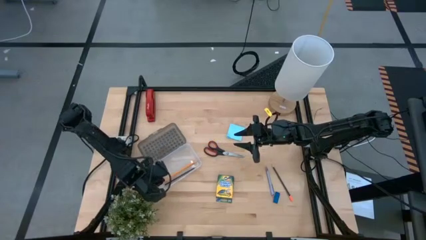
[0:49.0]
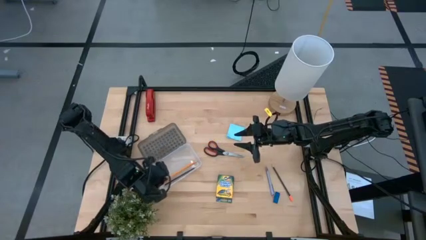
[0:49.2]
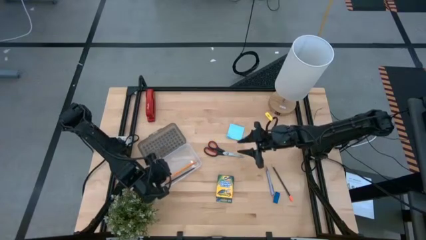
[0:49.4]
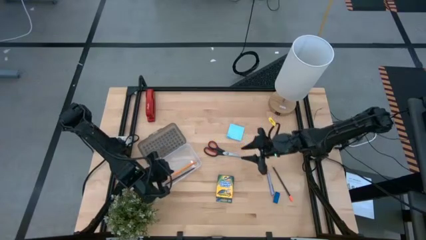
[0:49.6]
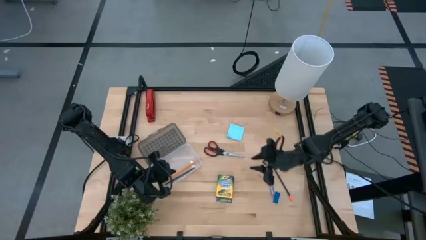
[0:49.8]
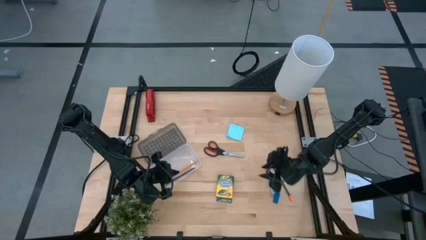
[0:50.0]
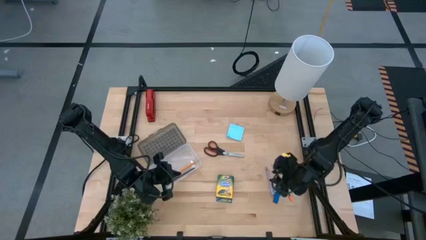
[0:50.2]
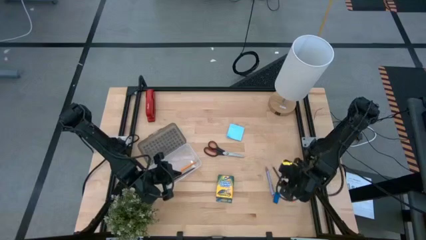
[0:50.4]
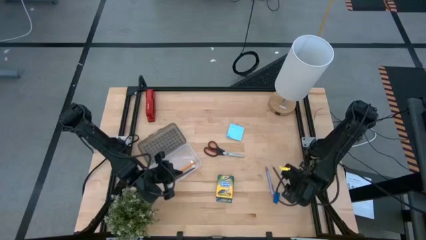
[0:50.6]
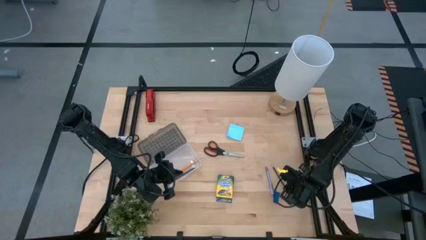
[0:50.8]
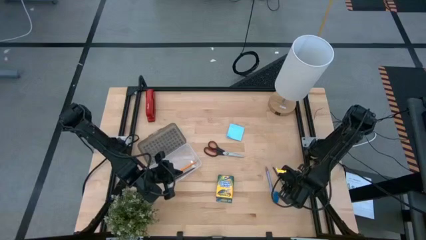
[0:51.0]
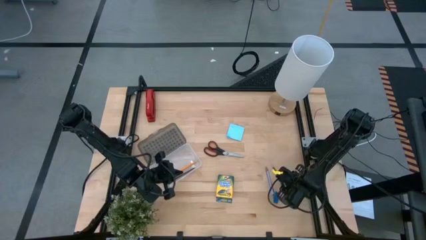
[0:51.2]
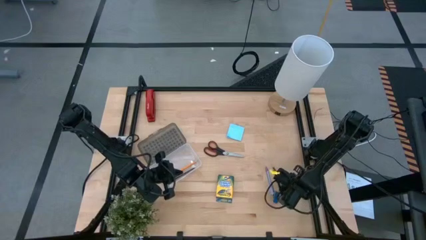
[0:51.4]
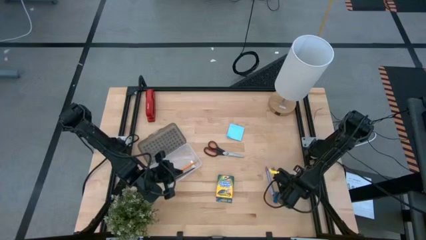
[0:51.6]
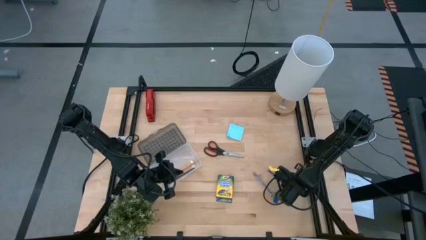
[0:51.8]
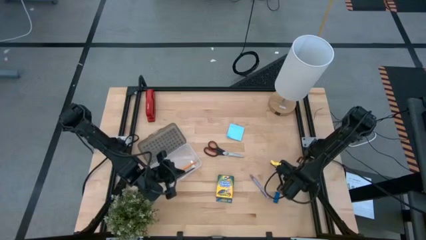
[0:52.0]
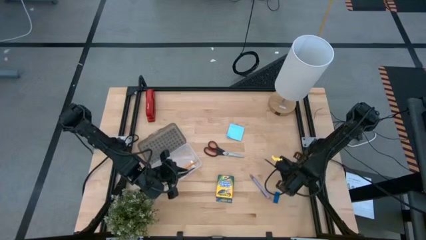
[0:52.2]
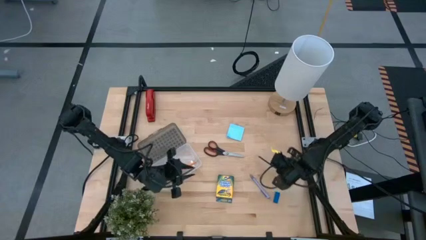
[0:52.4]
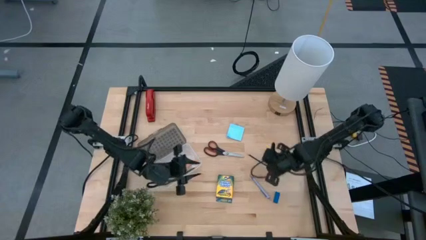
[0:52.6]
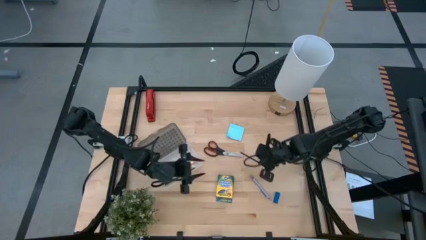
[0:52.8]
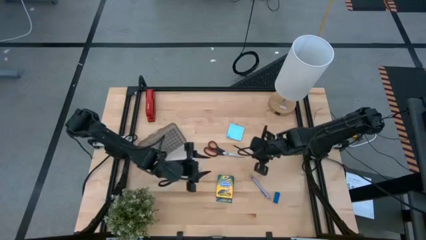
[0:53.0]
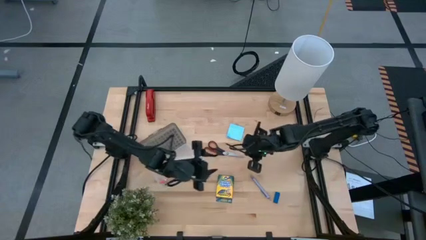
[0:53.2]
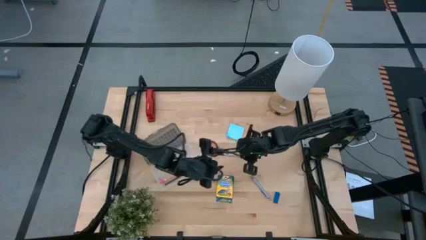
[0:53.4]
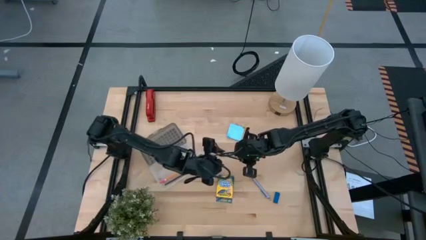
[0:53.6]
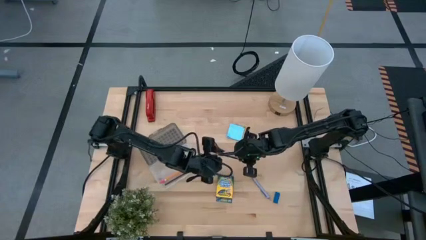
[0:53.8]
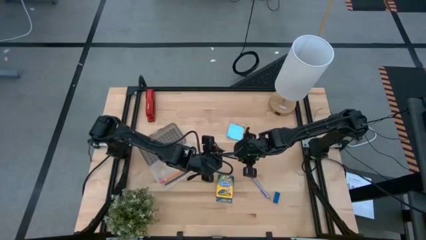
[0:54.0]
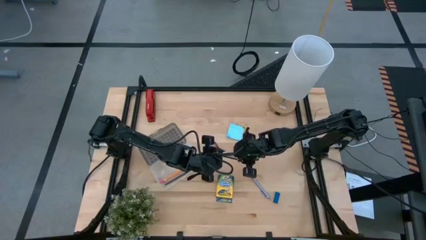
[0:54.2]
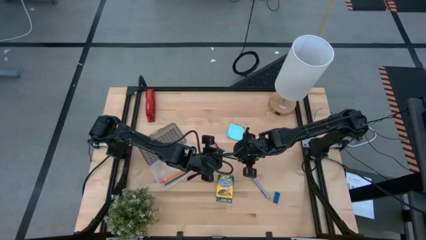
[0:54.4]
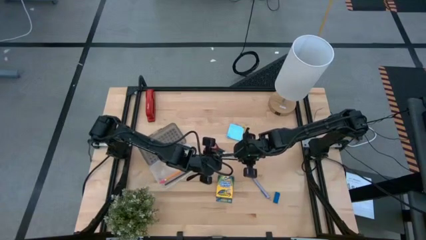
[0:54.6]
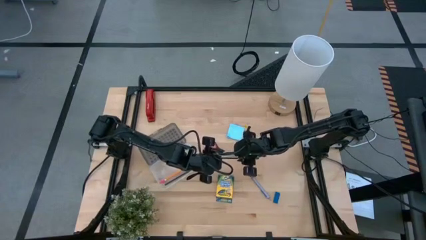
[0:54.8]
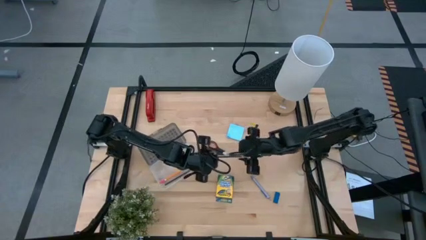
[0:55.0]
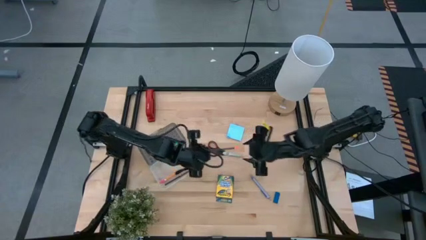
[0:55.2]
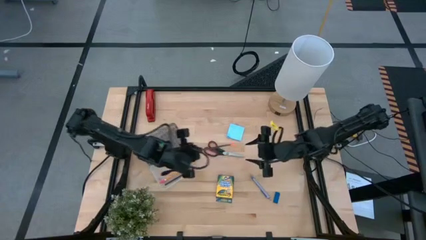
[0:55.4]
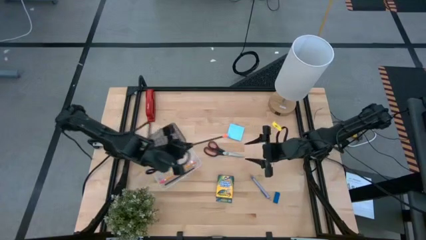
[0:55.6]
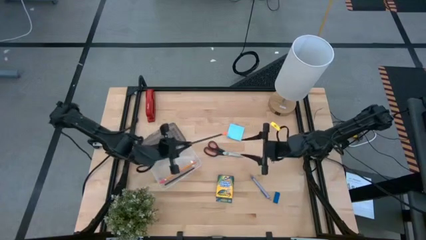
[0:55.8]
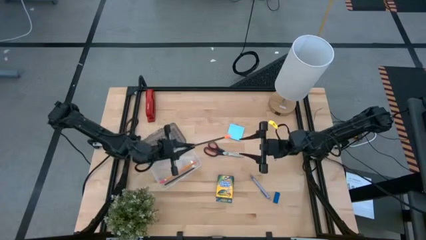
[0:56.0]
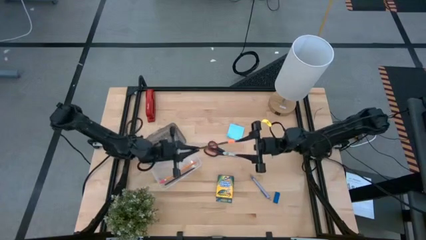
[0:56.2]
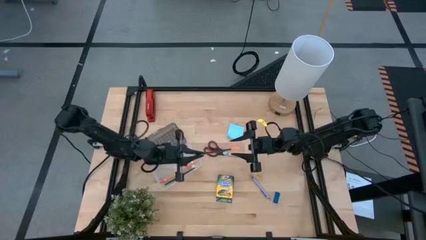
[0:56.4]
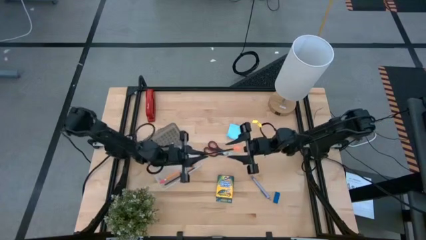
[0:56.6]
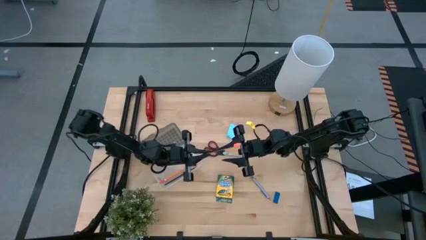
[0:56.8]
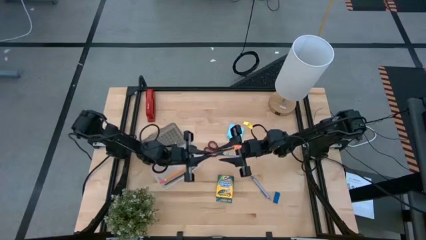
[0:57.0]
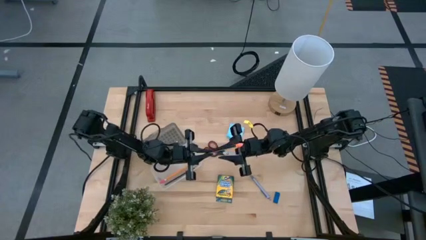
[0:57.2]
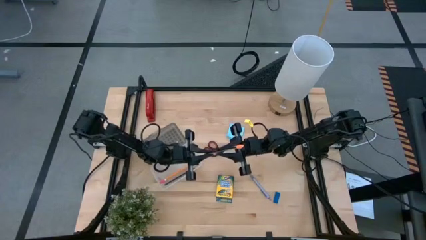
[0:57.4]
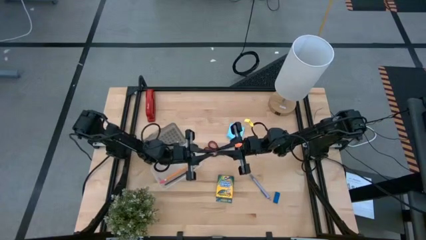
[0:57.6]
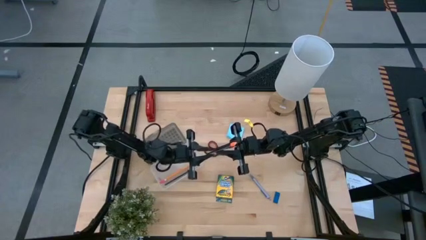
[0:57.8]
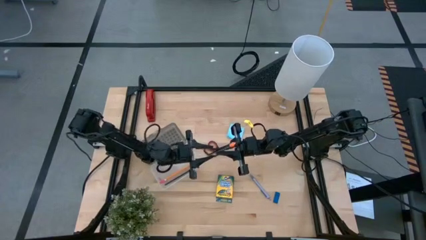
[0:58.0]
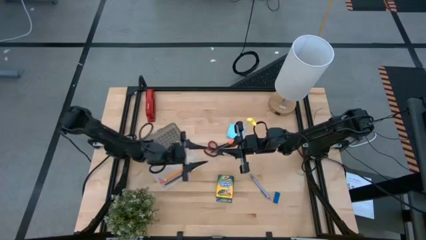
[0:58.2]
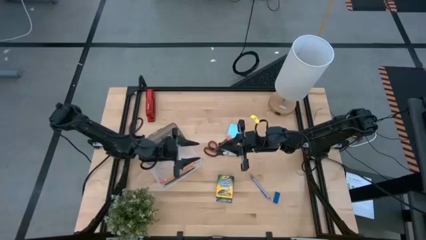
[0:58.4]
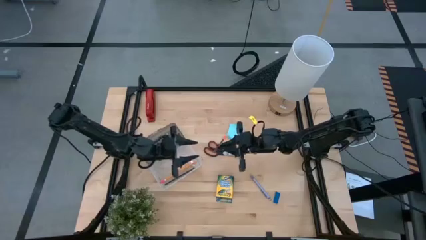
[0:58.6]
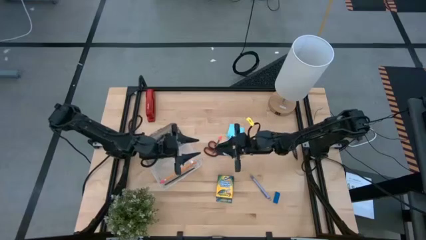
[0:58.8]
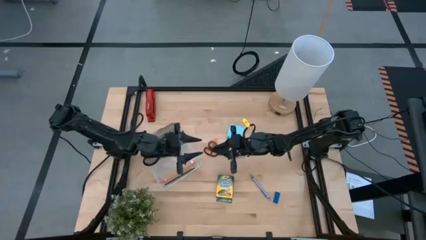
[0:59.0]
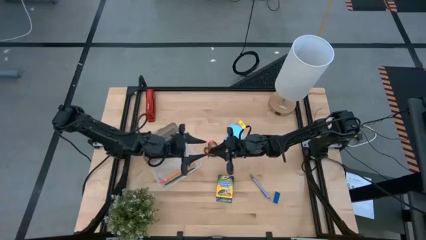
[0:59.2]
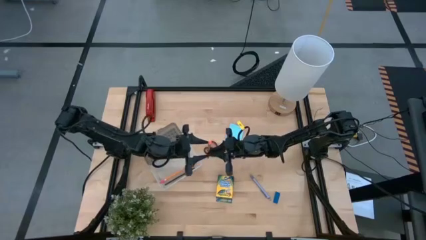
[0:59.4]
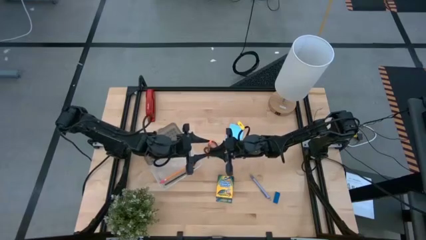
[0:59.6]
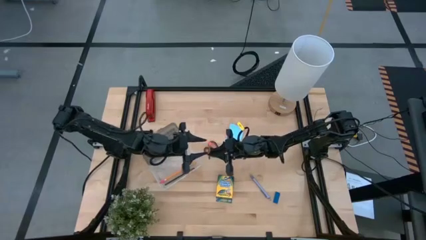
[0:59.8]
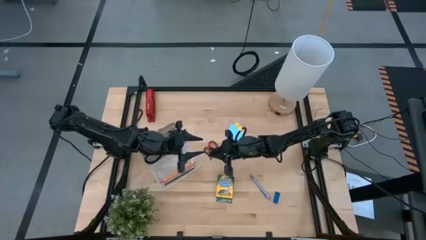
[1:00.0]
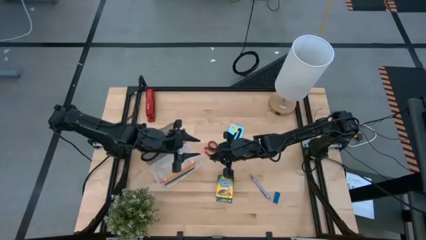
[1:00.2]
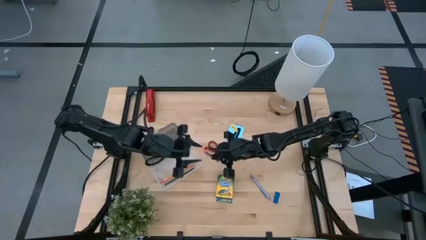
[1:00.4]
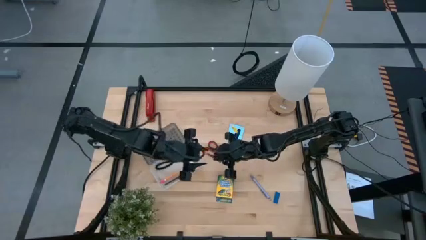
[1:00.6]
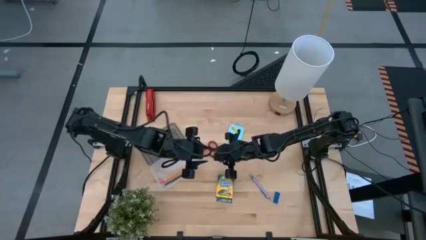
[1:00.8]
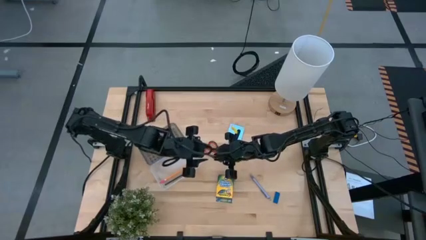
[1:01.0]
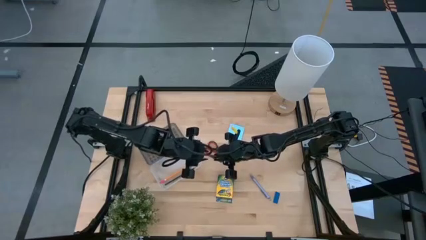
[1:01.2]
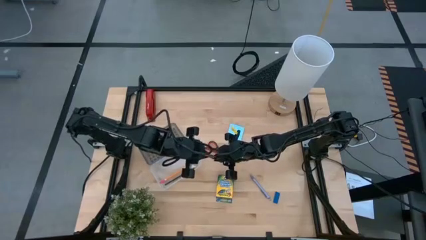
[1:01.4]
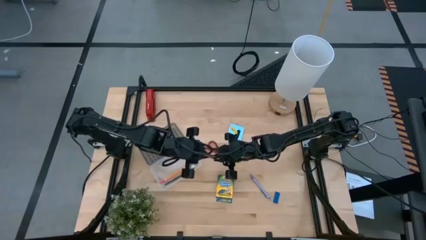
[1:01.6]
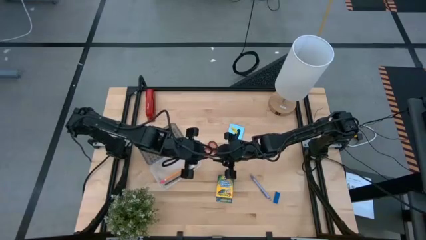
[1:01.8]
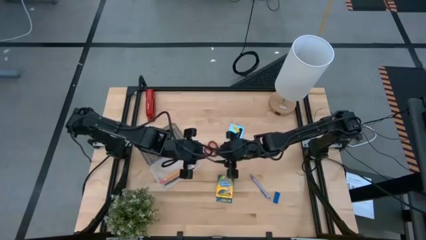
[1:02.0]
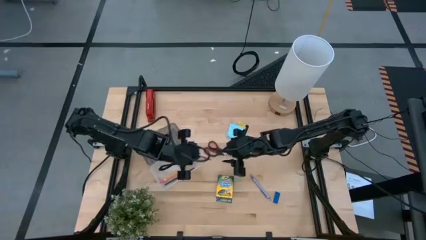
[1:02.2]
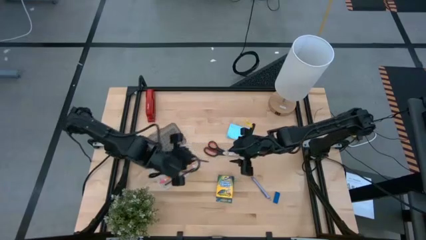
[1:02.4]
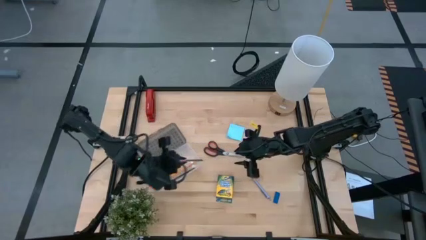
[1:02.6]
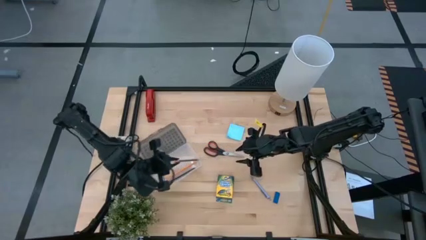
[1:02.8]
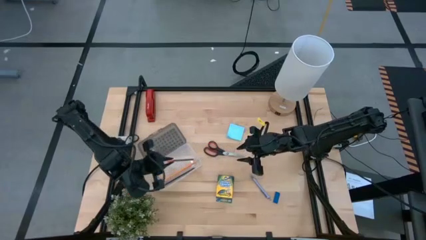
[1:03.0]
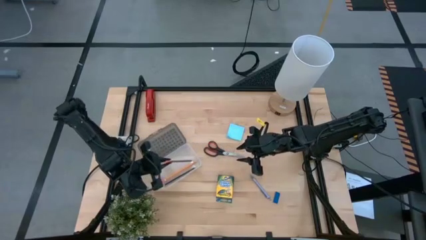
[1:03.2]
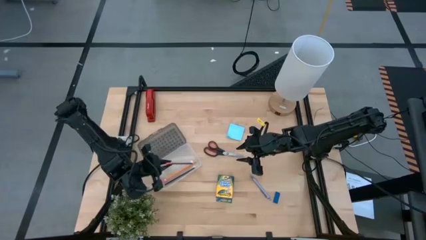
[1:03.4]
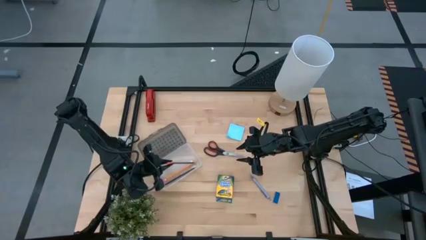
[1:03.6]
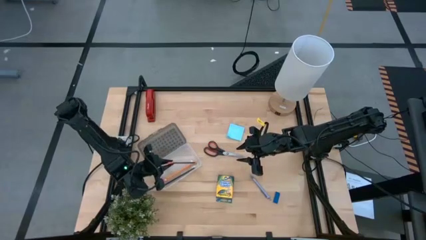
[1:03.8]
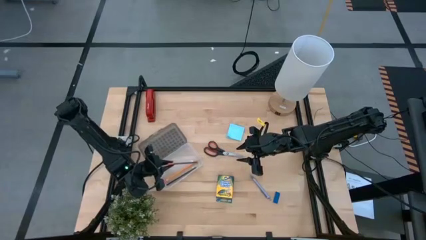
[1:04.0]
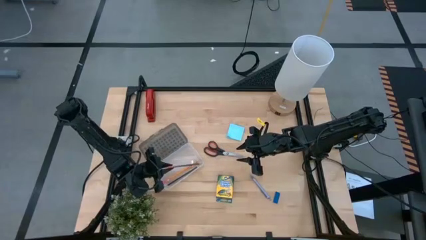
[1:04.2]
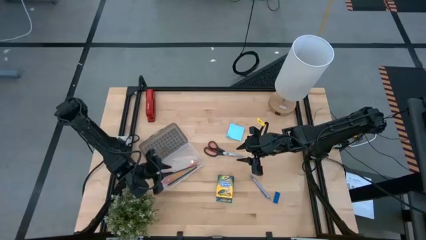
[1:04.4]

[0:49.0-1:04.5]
Task: Pack school essentials
Put the black pencil into the supply box

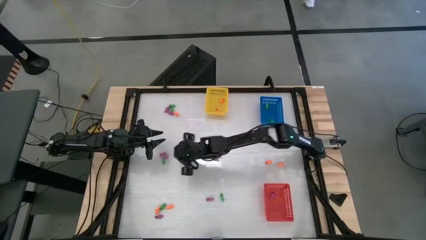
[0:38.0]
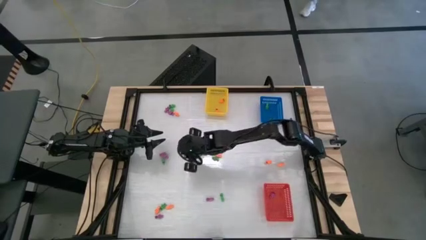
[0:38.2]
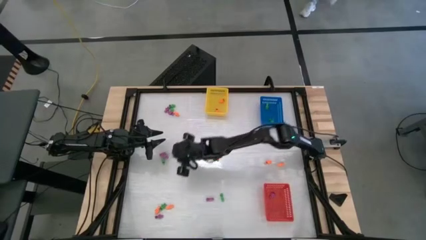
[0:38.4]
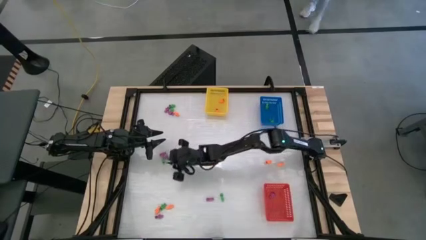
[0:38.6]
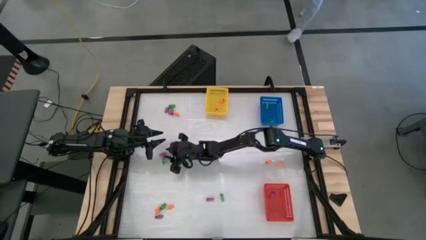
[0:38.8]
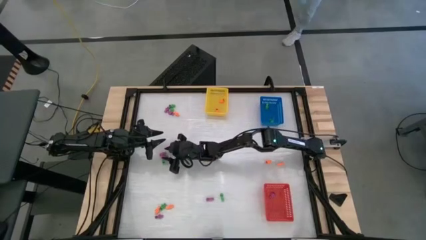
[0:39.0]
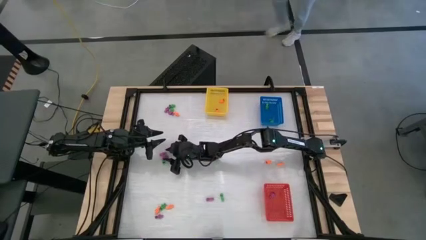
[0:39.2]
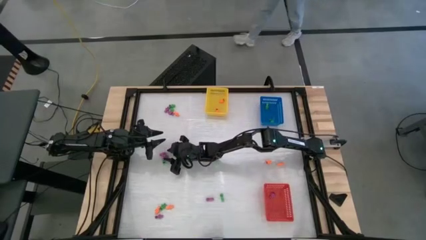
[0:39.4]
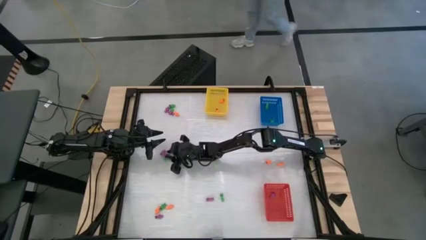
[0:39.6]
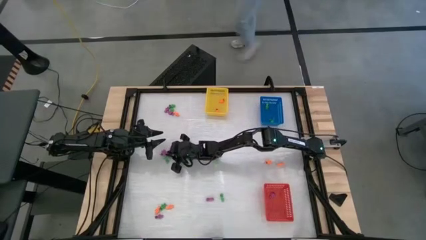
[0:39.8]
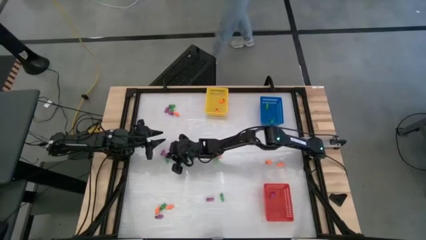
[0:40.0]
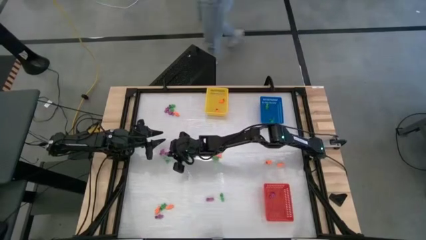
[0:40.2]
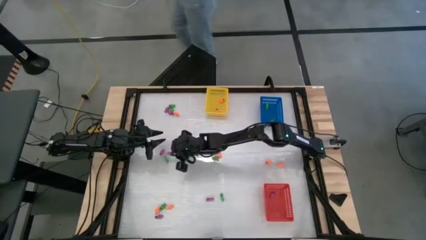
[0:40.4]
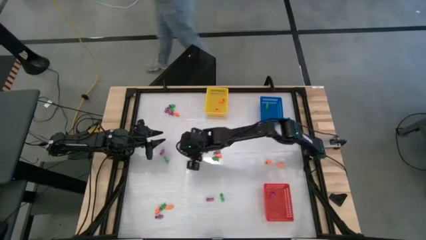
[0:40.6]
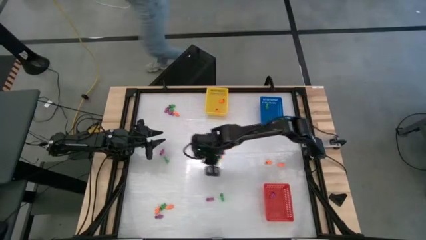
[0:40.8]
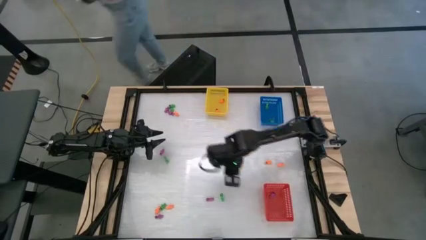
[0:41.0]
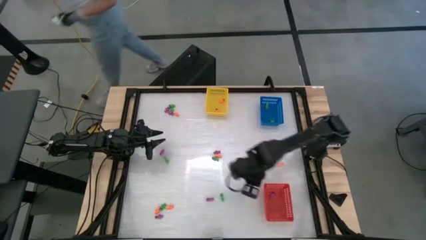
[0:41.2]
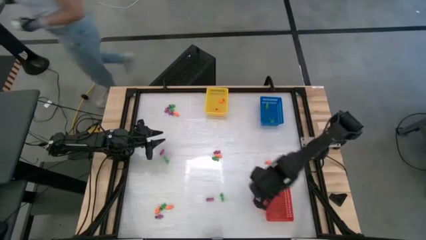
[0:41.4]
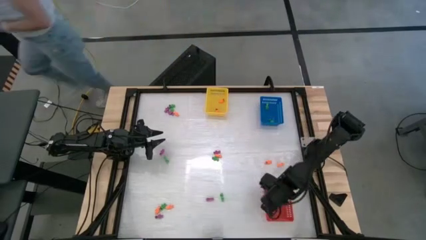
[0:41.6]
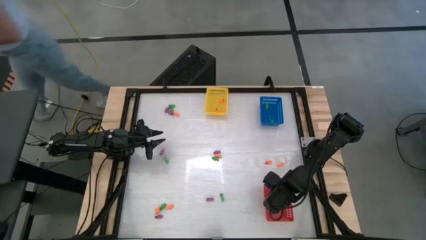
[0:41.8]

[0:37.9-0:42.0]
Task: Sort Halloween decoration
Put the violet skeleton toy into the red bin
